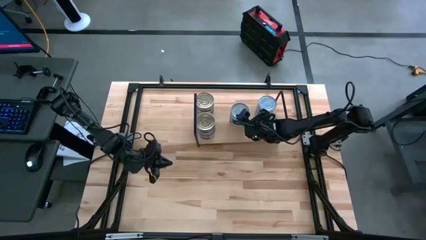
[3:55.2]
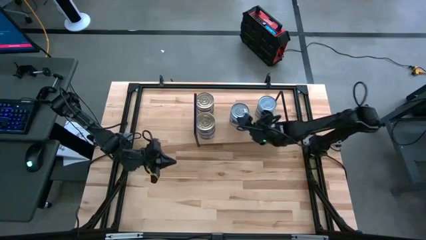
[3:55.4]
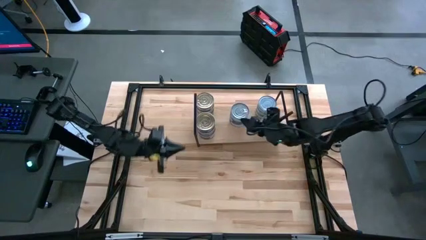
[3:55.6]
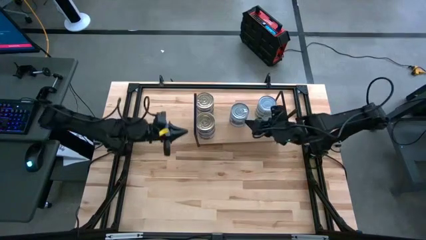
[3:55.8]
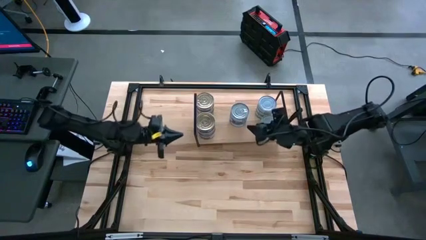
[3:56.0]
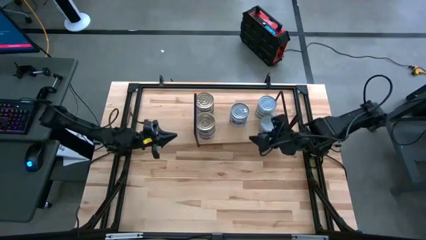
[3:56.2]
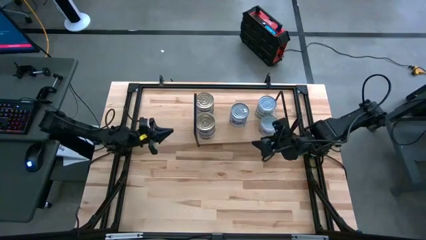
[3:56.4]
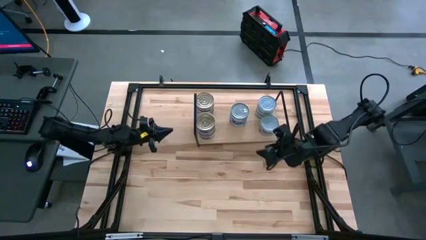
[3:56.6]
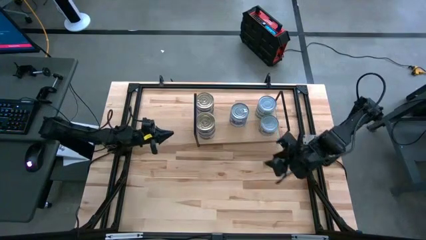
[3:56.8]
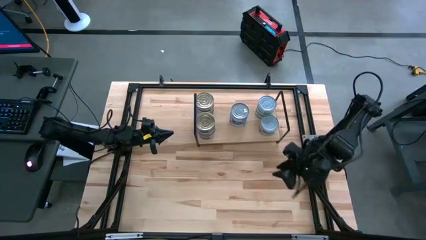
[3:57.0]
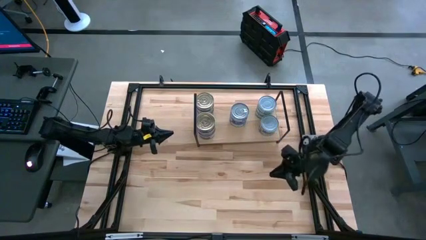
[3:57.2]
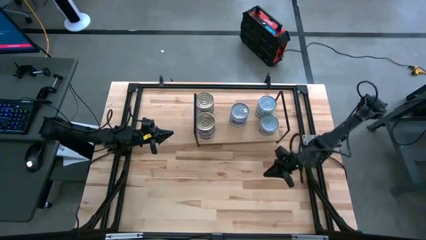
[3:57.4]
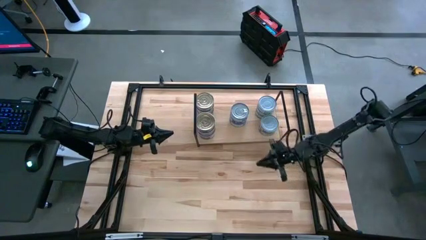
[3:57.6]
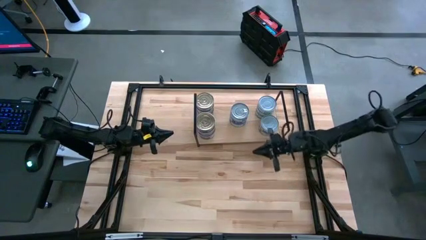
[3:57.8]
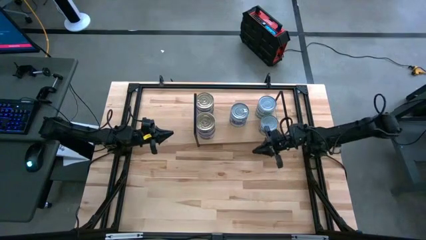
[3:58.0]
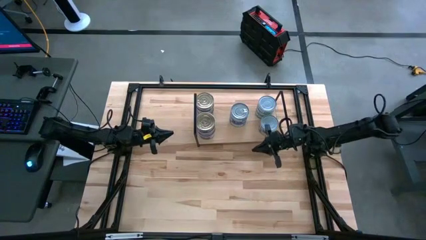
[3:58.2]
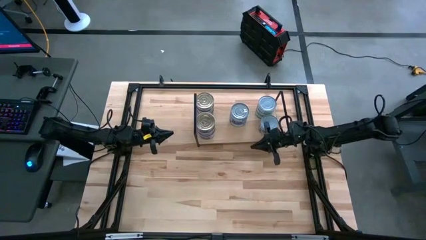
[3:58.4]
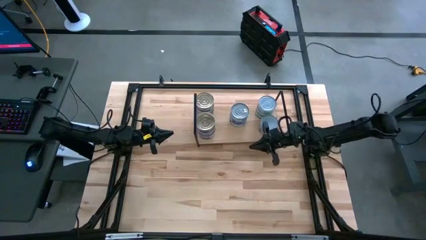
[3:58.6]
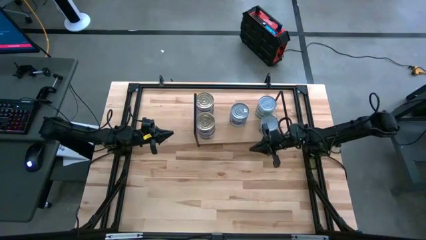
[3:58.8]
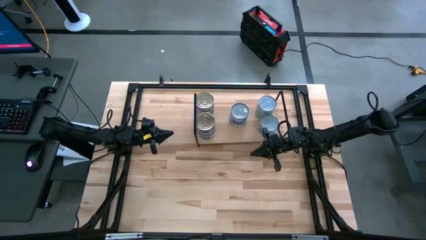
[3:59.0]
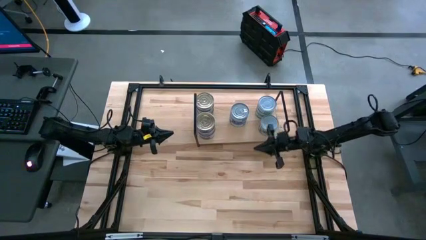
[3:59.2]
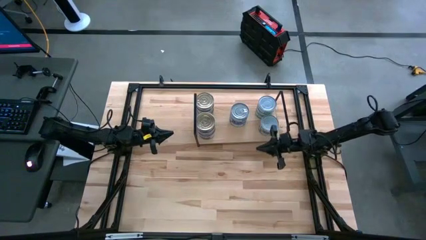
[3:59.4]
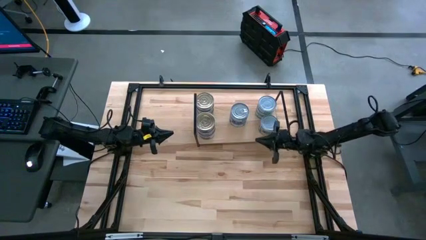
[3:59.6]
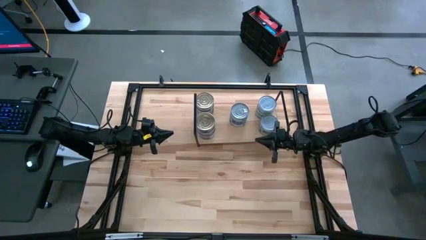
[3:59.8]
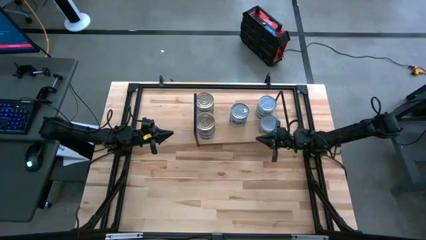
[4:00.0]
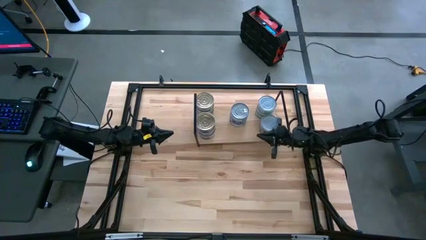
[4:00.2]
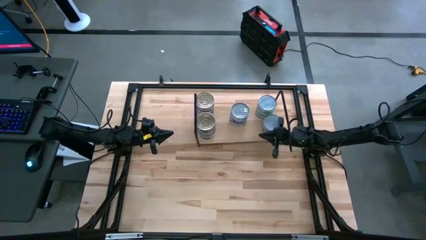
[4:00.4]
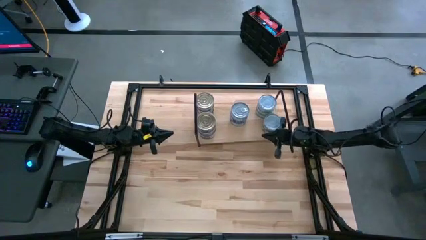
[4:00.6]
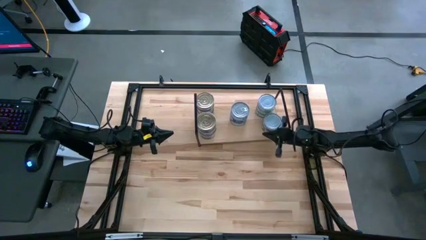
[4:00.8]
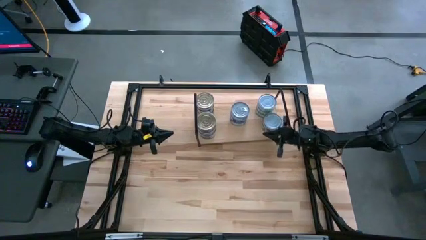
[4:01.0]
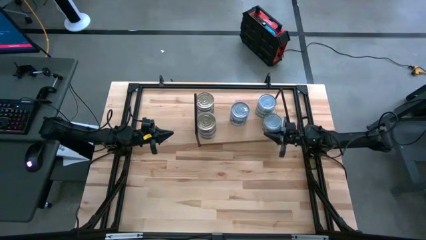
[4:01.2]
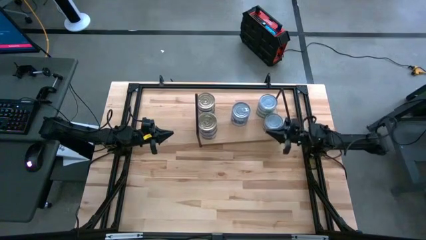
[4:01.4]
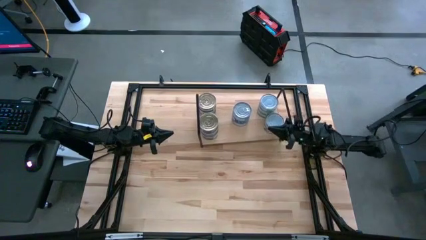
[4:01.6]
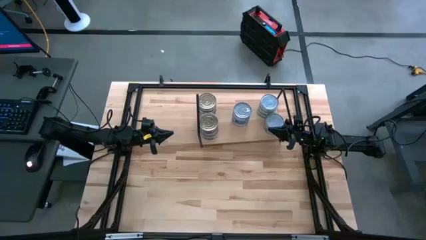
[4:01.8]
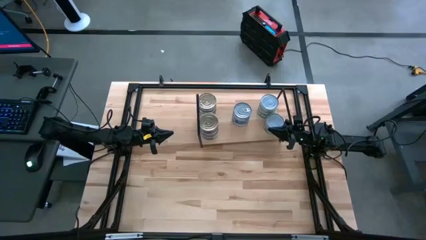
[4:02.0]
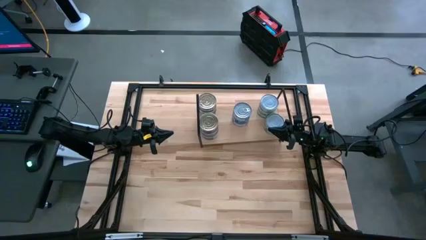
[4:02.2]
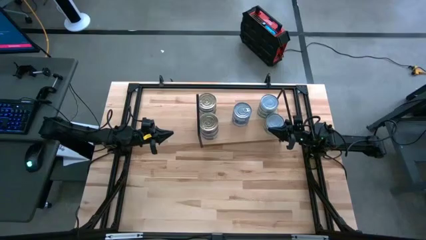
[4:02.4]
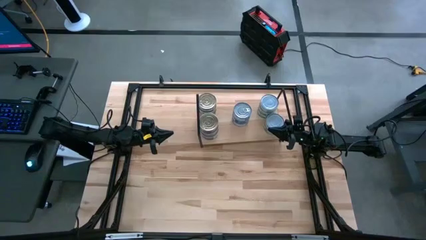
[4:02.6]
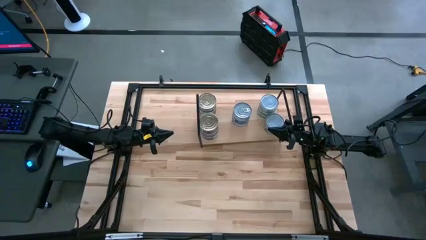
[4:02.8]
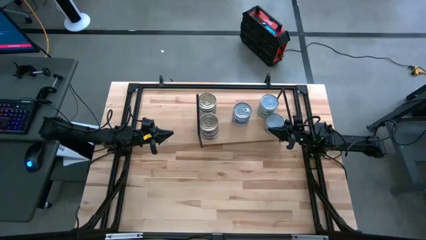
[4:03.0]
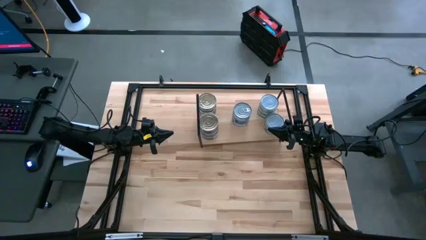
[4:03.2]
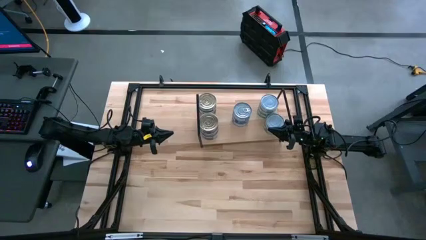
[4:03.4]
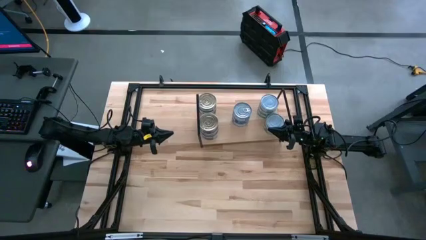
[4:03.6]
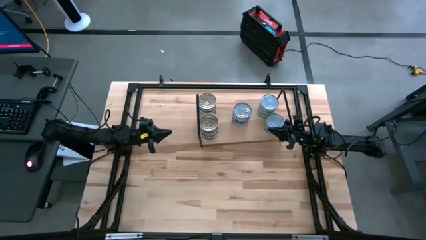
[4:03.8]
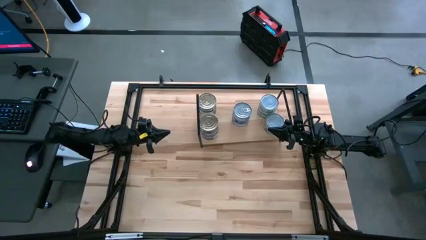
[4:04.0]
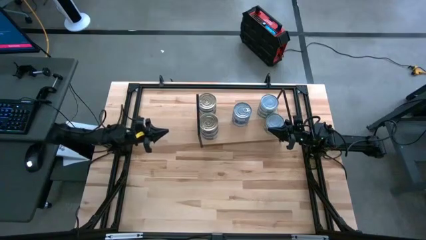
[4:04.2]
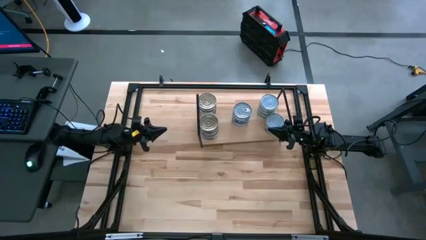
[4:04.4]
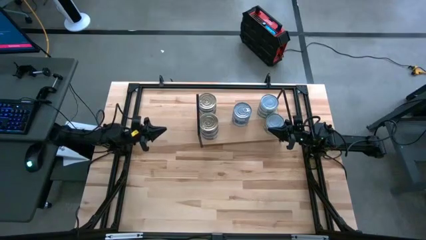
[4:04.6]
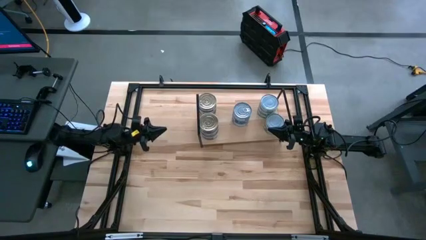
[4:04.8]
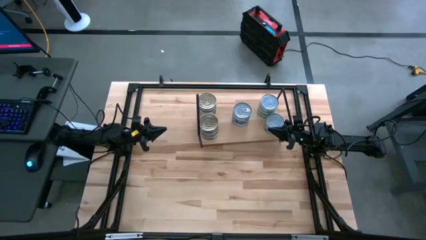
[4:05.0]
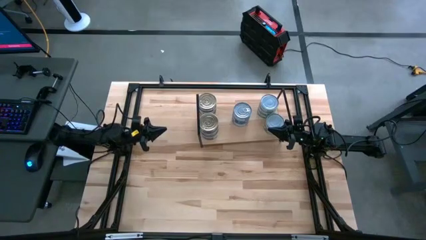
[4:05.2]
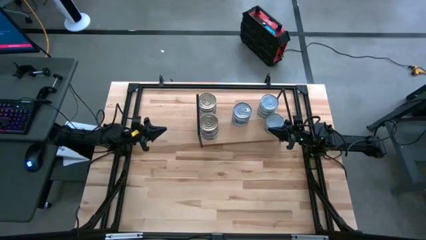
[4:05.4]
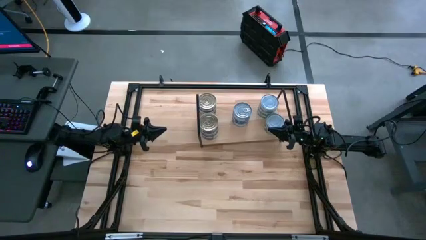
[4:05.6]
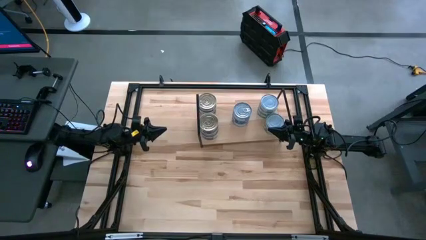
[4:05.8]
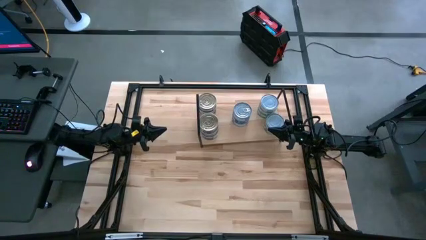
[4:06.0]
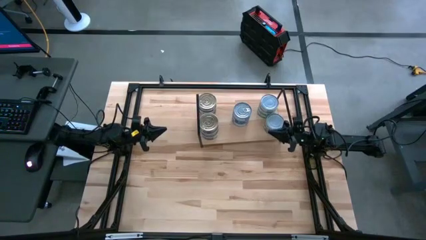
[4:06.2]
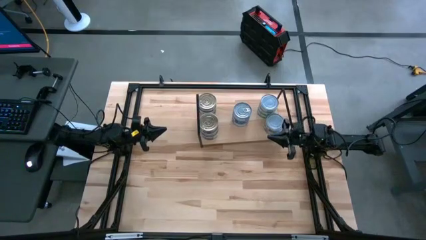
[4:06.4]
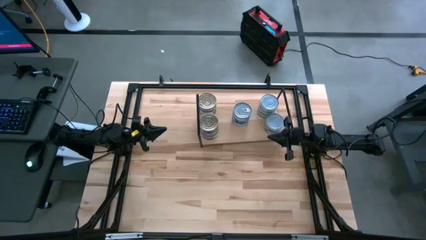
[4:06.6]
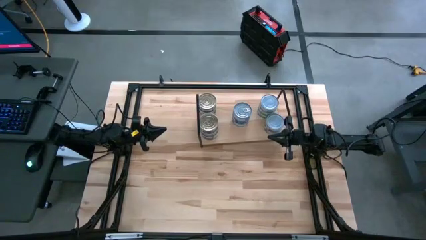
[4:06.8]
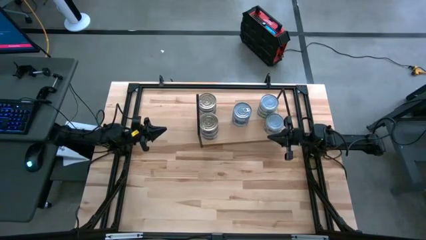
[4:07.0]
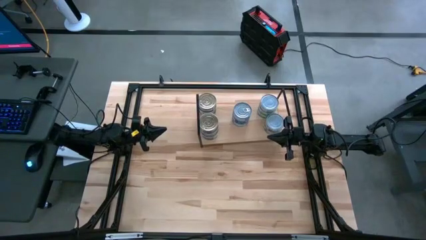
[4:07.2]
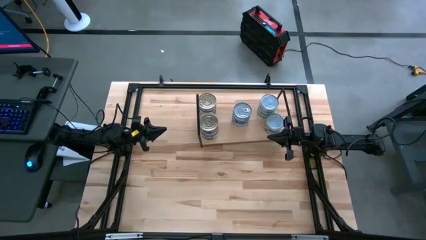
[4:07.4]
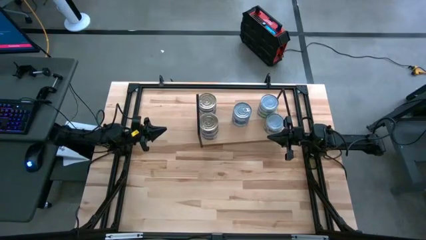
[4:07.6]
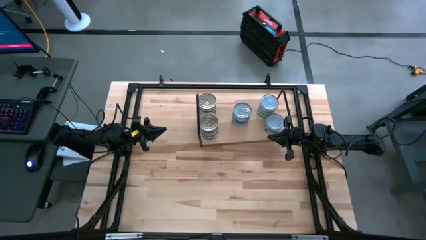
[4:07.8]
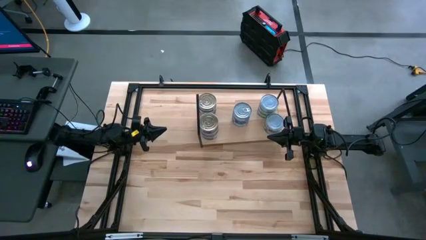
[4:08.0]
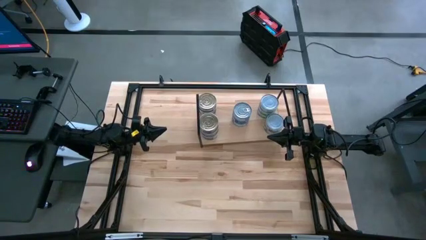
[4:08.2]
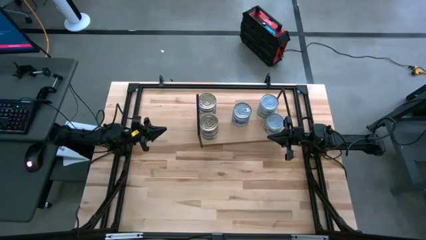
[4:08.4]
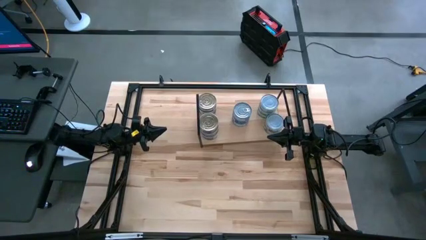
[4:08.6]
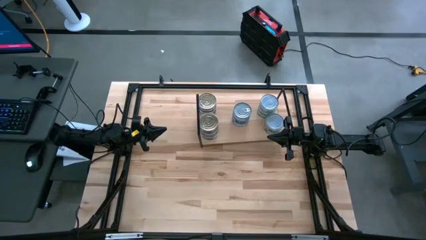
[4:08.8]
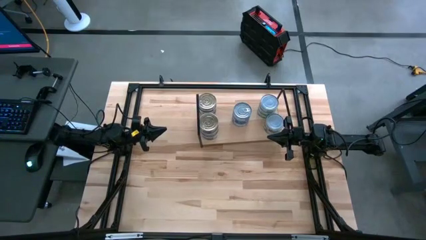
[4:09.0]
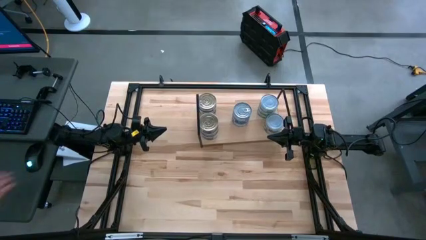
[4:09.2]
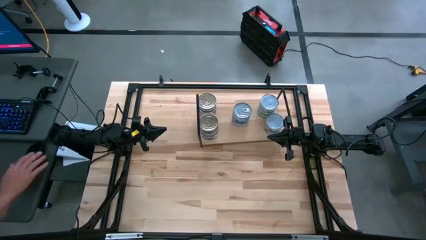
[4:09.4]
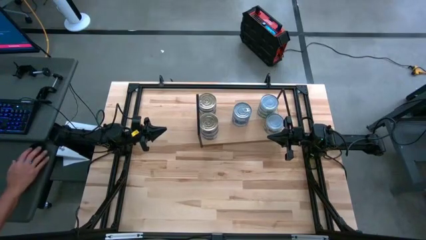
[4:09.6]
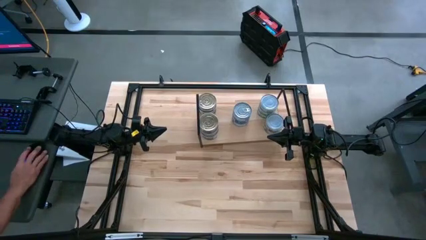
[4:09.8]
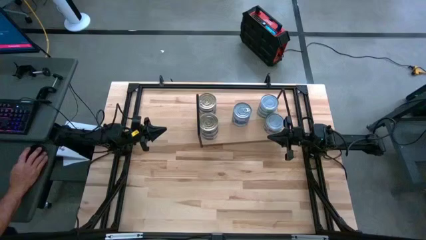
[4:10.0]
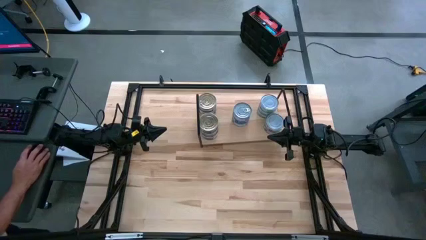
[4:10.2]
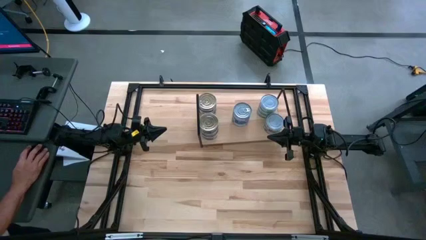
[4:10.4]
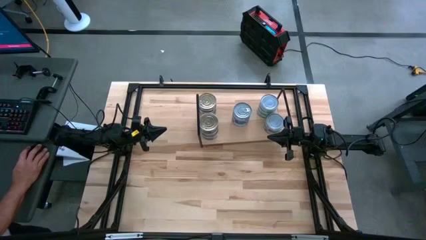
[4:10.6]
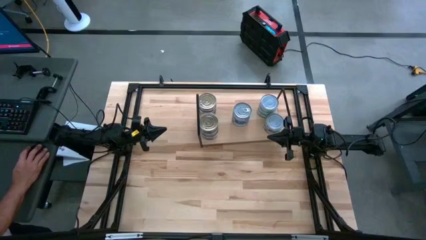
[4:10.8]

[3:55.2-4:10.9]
Task: Stack canned seafood by type on shelf
Return to Home Position
